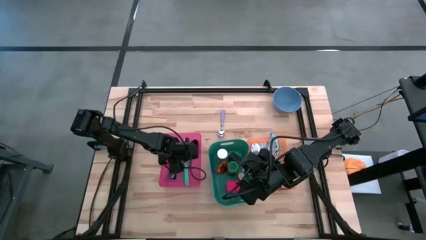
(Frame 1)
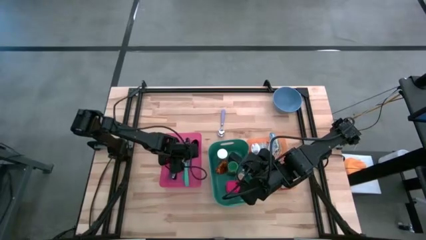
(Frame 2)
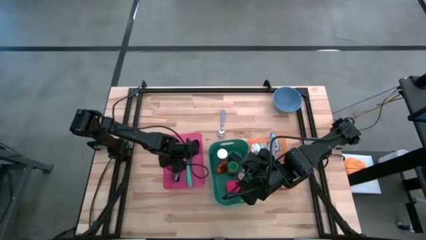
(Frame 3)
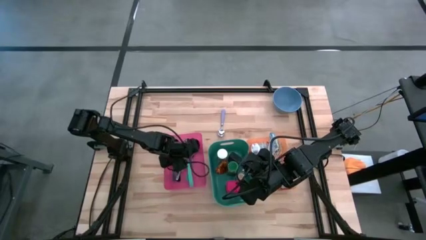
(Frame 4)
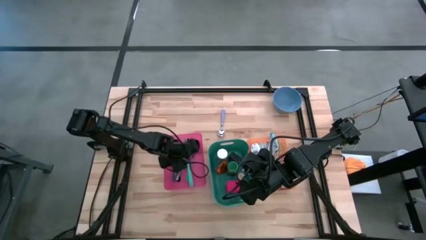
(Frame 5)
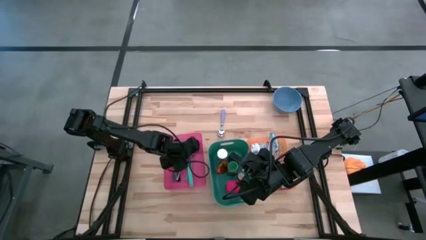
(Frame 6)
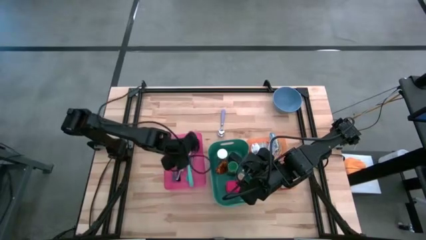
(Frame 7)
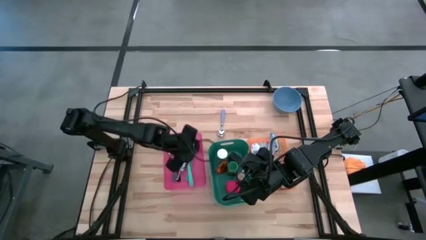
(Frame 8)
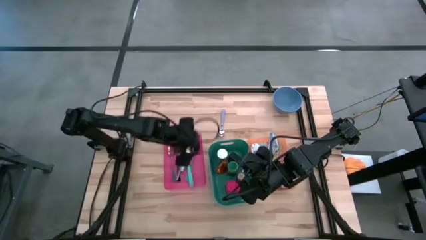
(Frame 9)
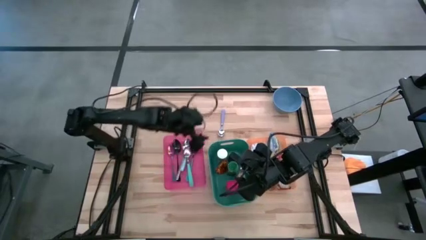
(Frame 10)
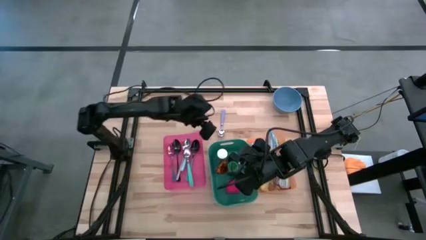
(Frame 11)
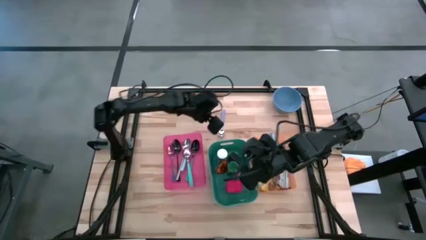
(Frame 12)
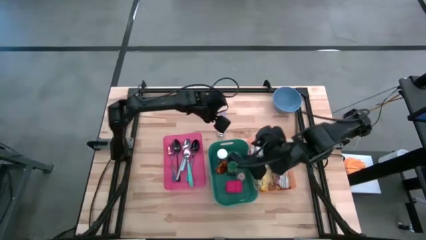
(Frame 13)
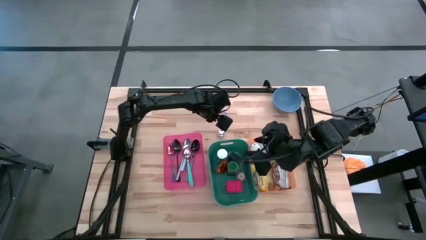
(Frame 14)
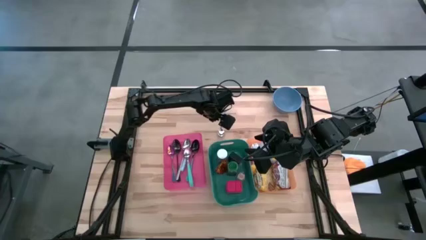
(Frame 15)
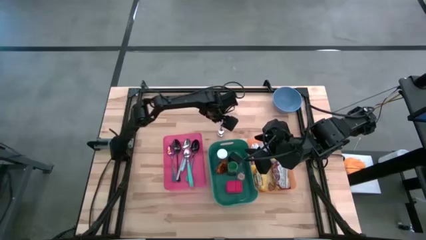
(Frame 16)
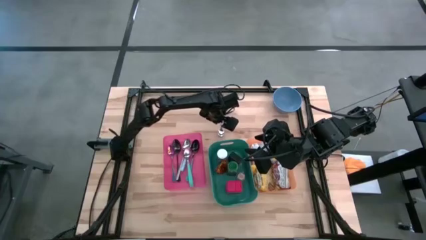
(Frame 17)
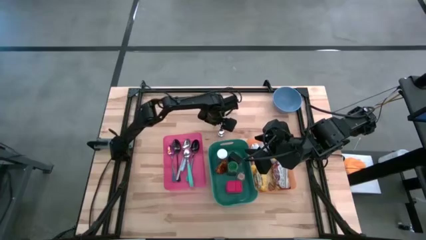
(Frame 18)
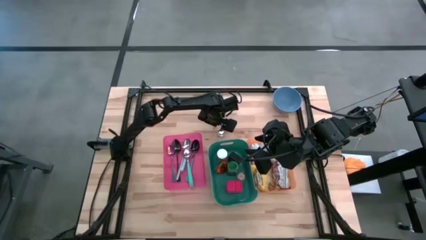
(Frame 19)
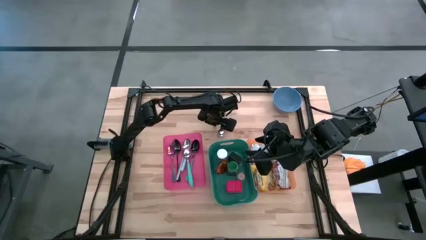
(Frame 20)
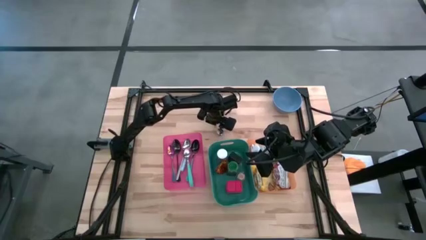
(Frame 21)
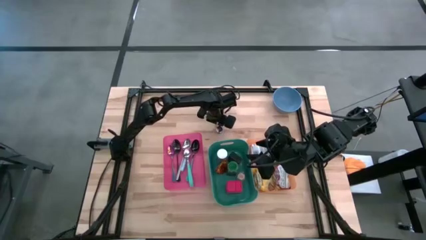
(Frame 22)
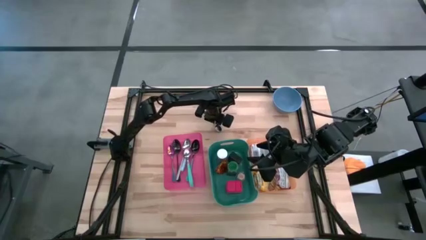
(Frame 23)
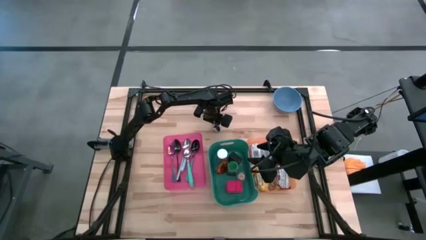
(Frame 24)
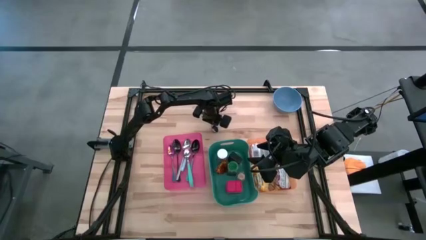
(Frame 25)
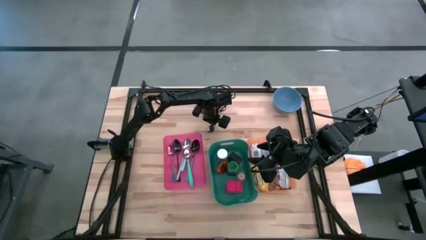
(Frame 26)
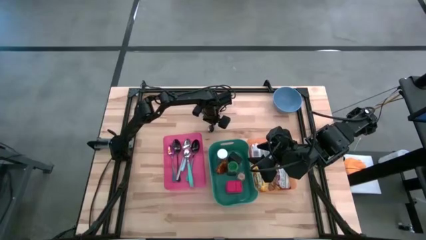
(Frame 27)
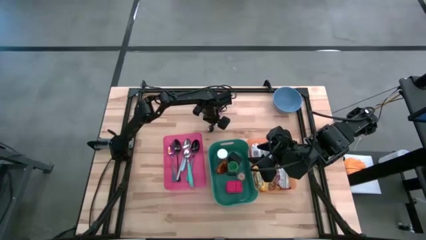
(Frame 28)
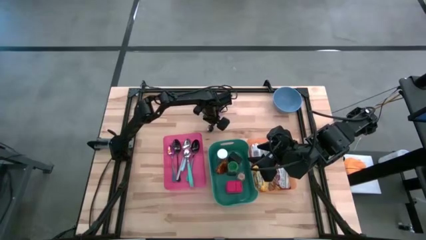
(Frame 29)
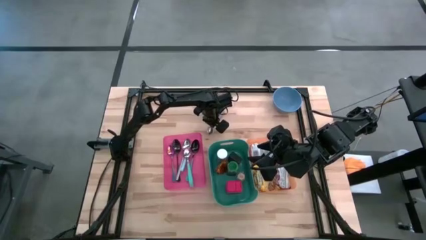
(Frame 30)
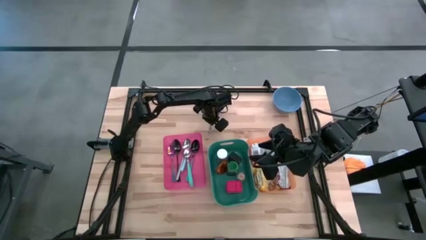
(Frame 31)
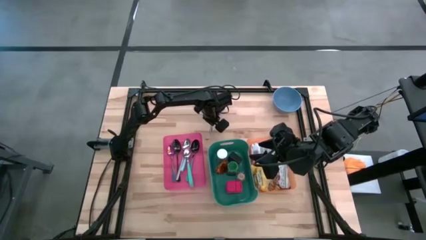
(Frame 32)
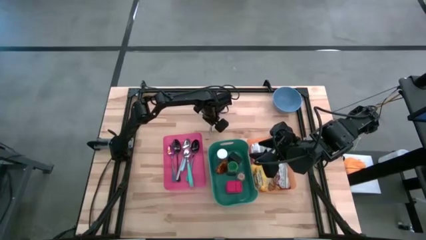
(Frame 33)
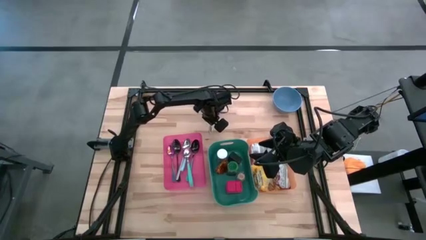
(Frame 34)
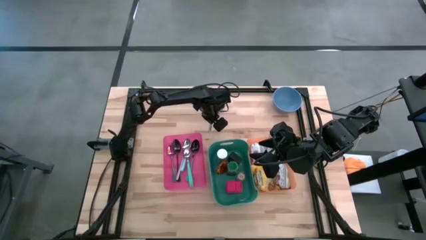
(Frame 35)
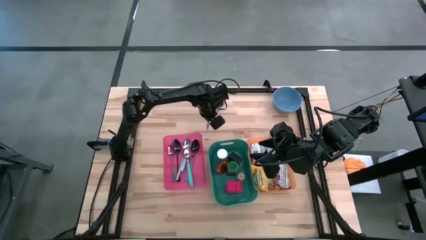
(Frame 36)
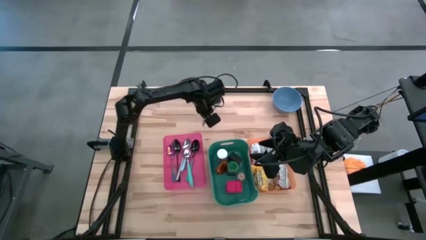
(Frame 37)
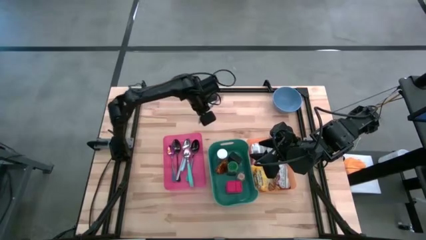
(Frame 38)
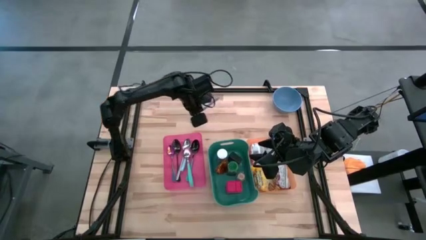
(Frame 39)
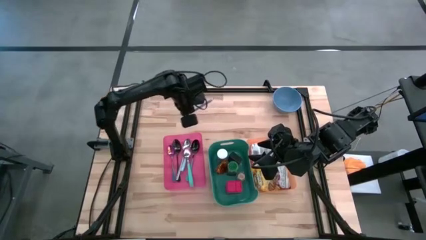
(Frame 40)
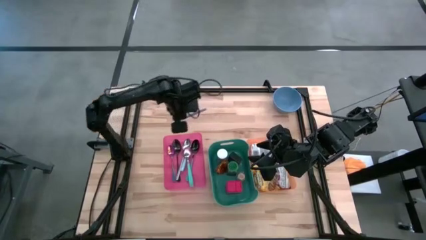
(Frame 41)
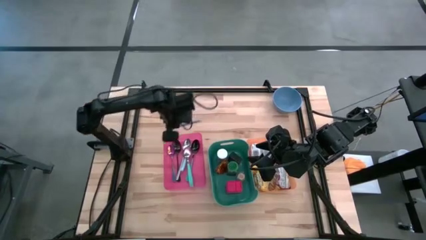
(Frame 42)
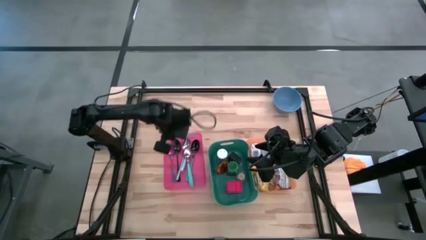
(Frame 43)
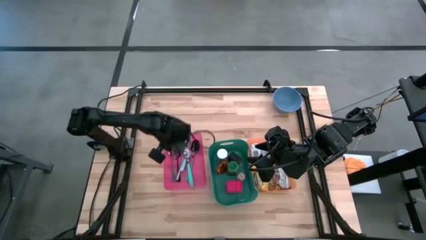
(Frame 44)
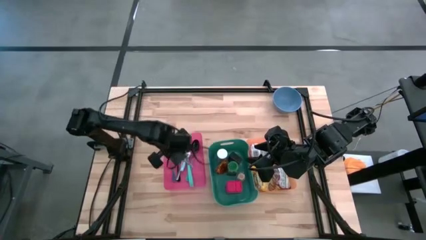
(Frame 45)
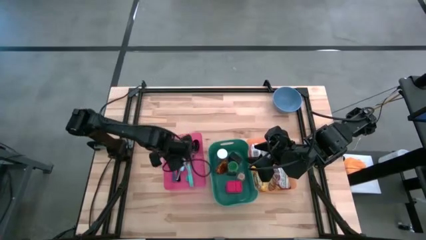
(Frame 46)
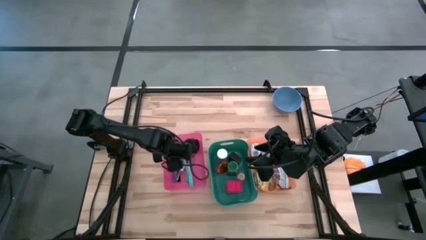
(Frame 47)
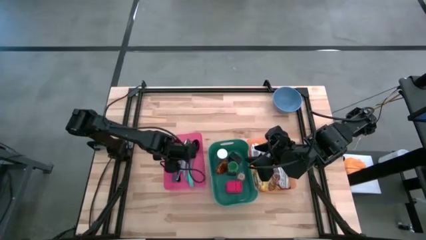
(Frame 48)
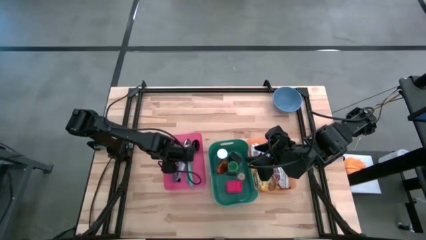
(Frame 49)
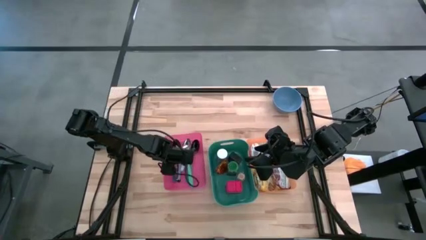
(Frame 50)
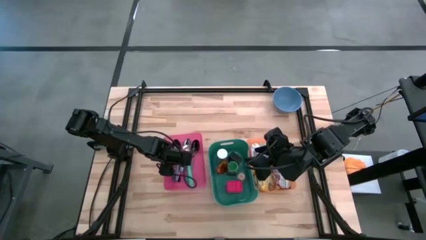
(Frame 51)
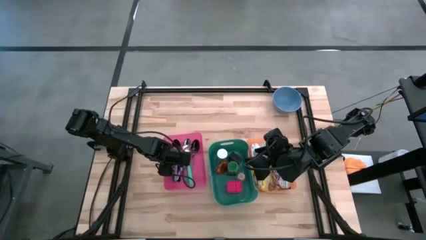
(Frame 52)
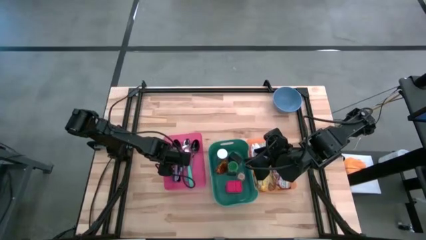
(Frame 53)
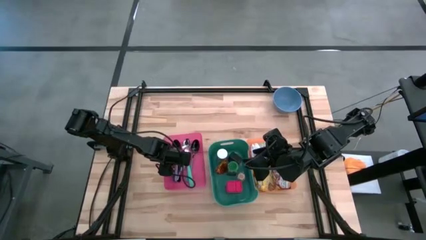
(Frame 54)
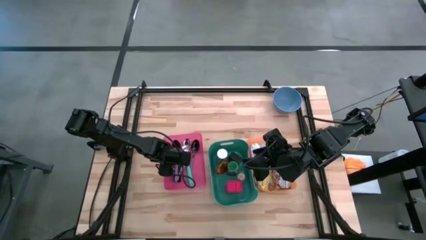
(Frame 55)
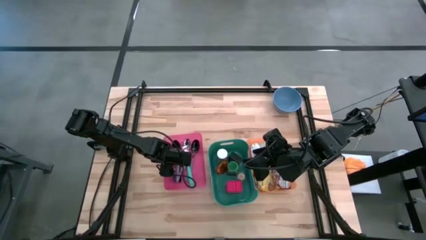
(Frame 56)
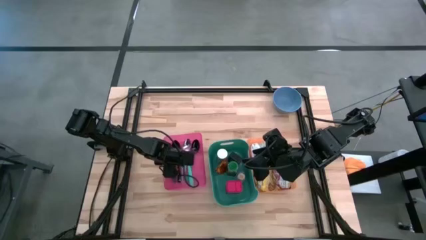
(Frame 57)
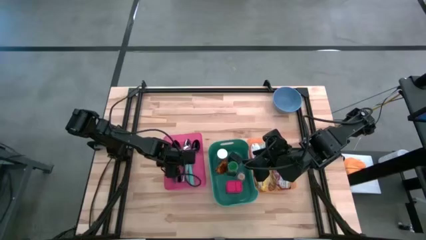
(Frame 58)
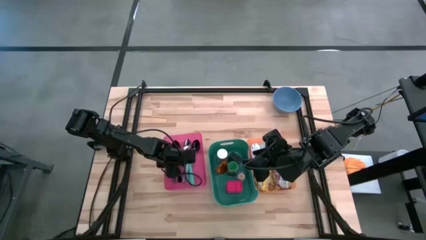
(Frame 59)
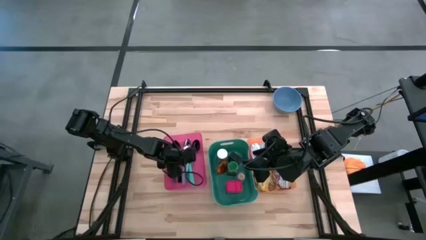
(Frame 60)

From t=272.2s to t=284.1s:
Put the purple spoon into the pink bin

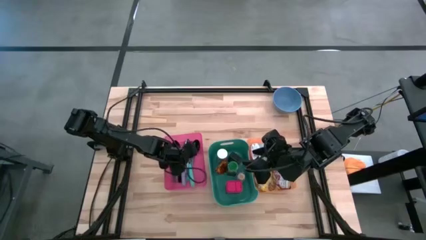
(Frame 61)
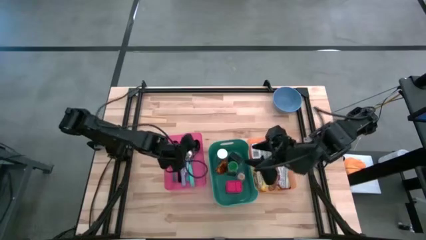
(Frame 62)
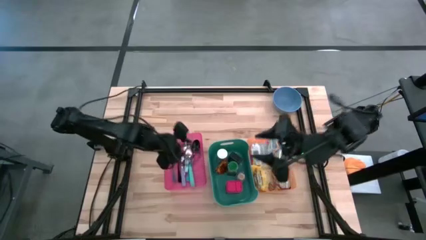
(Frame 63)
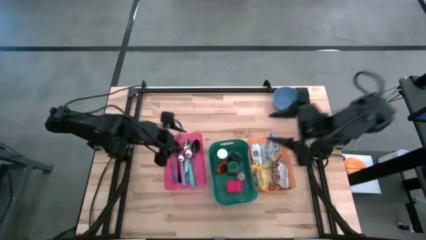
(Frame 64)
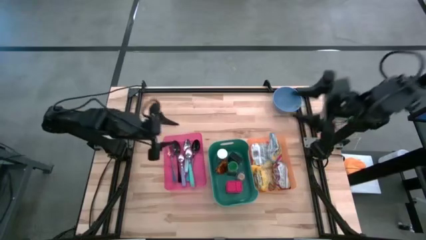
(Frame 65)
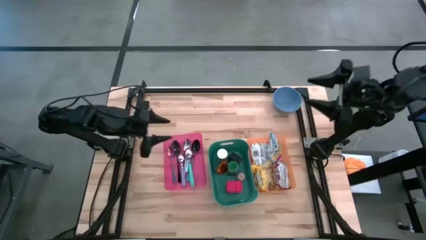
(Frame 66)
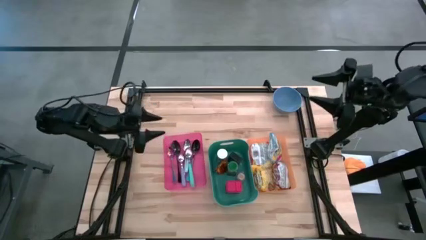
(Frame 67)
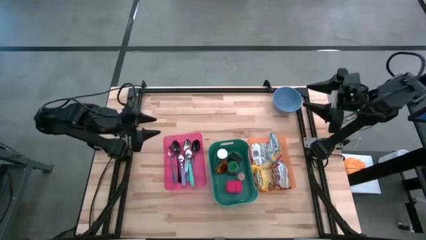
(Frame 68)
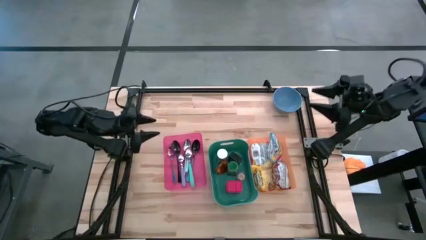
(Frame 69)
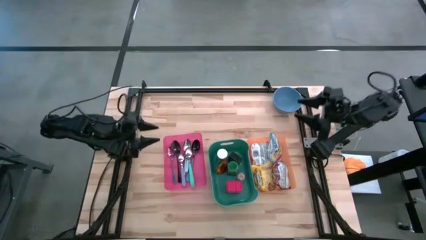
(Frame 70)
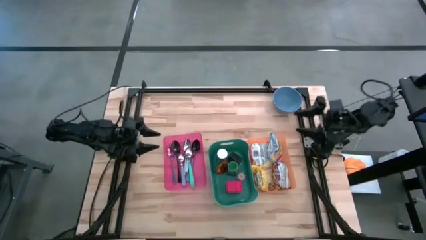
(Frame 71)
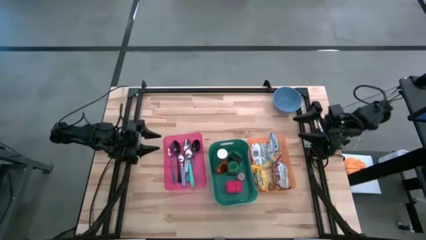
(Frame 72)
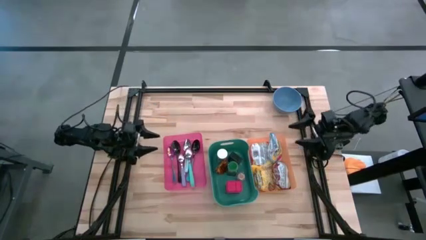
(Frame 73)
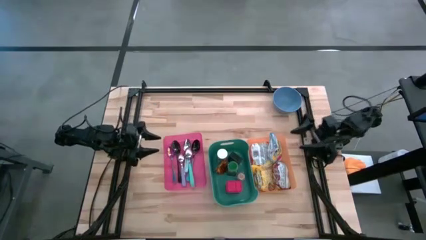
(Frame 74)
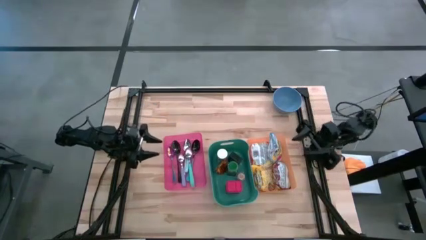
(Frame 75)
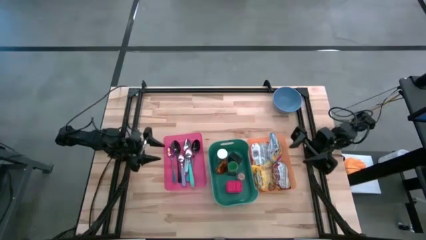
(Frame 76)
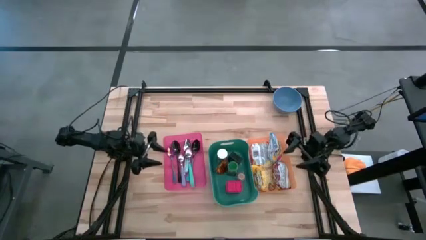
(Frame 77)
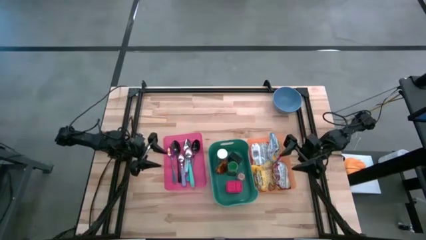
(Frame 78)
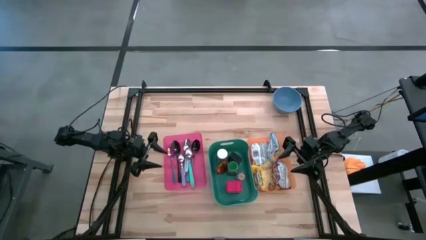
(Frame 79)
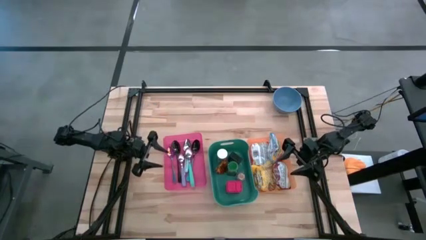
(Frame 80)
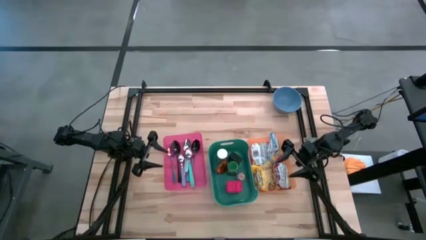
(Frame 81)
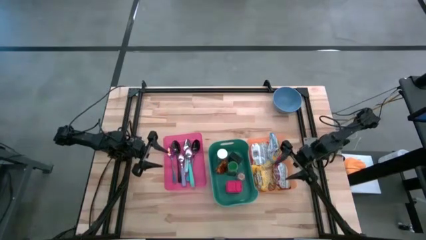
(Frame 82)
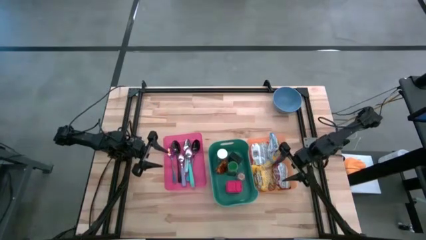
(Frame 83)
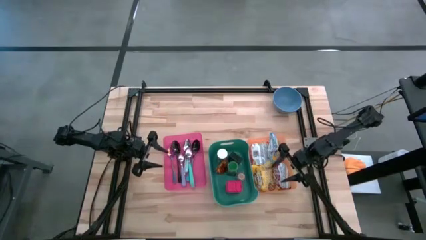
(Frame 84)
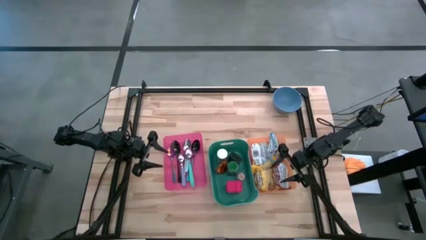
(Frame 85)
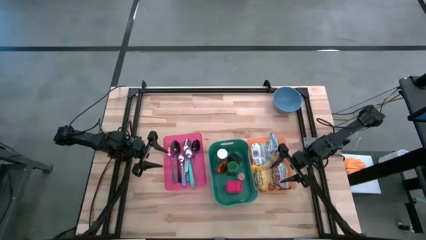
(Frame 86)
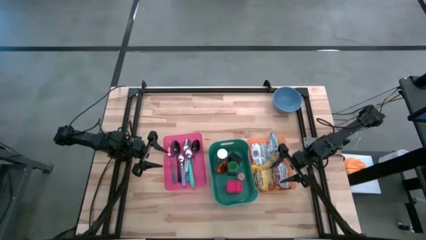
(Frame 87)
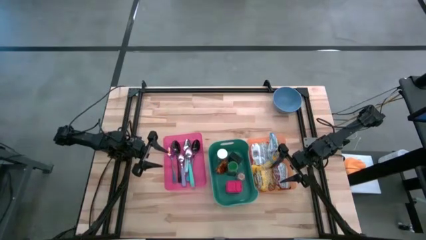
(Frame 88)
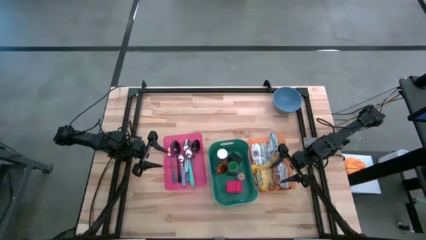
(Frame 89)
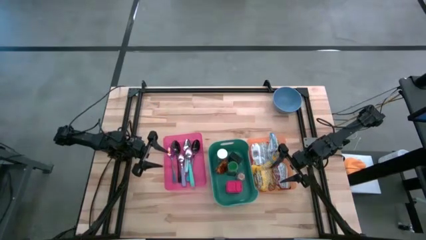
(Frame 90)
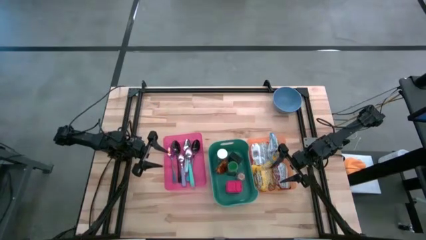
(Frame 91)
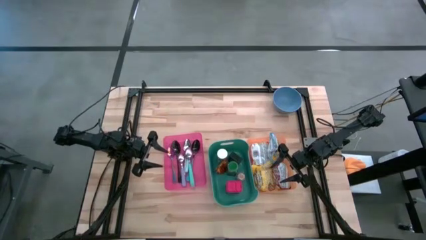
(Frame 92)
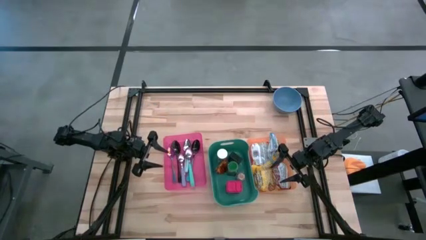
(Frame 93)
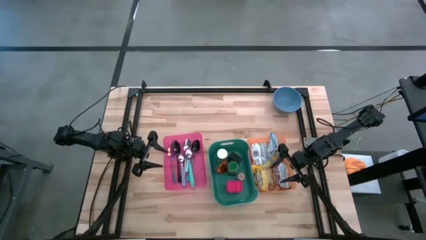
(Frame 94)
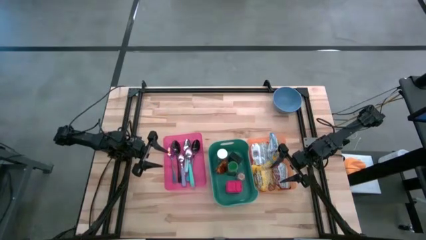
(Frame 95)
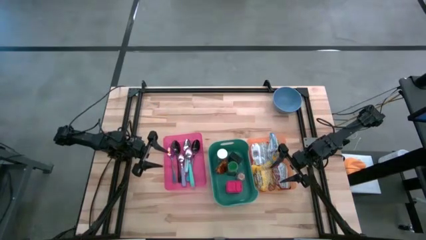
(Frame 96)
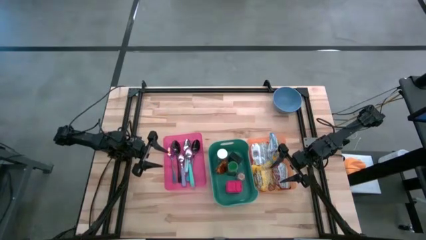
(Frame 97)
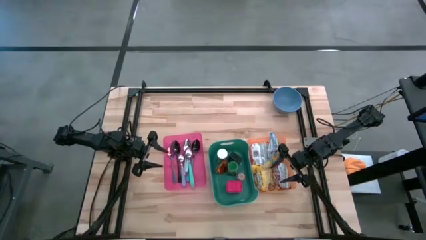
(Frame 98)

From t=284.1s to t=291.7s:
Return to Home Position
